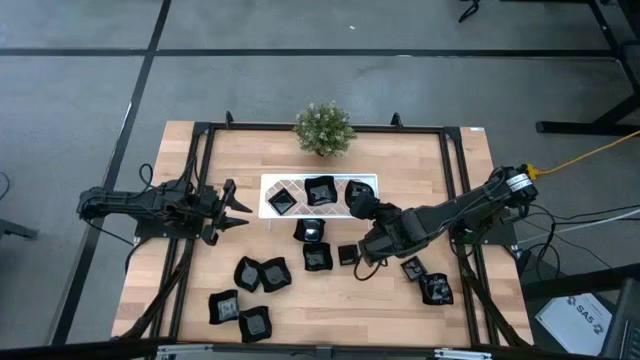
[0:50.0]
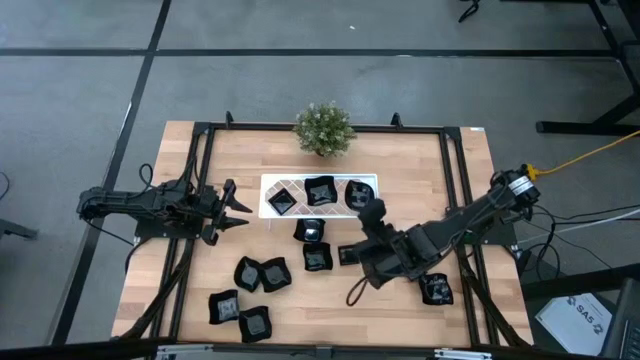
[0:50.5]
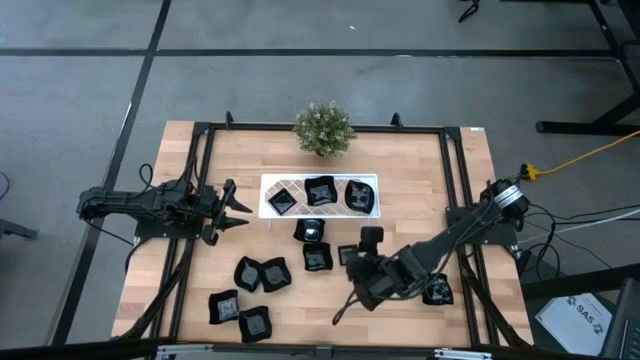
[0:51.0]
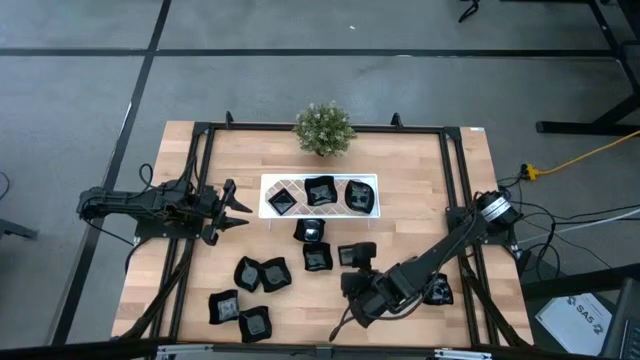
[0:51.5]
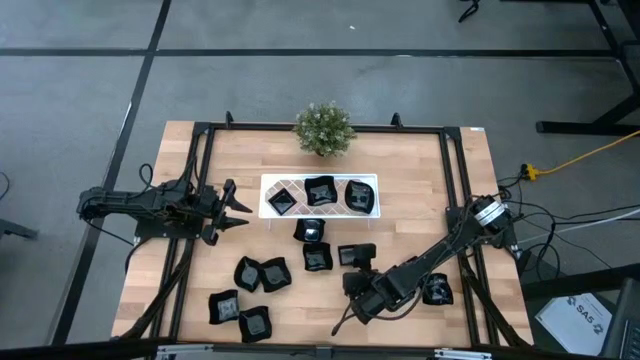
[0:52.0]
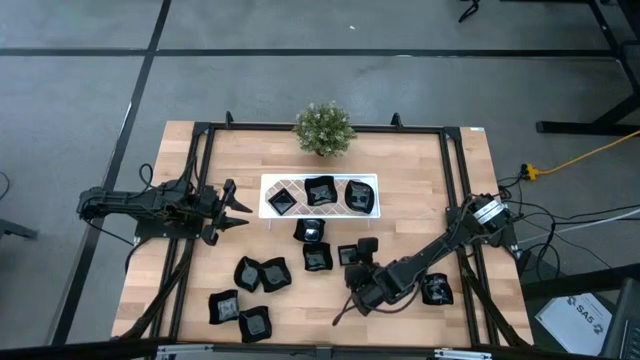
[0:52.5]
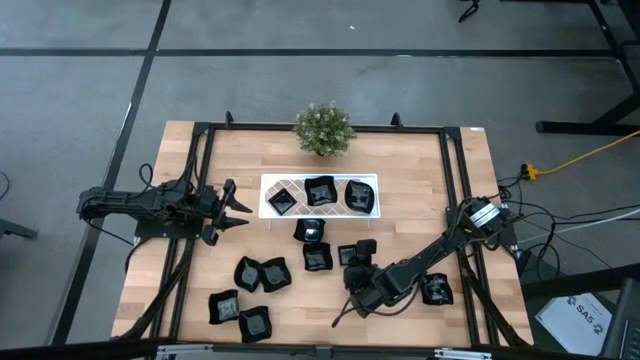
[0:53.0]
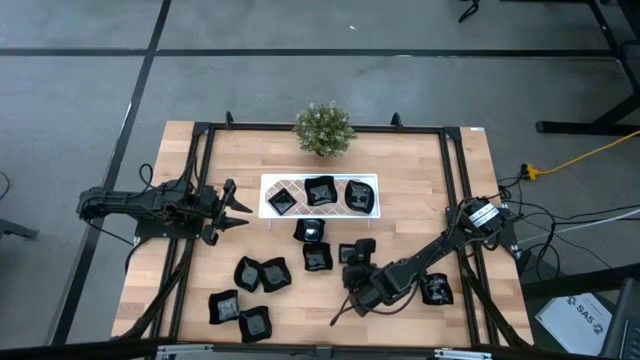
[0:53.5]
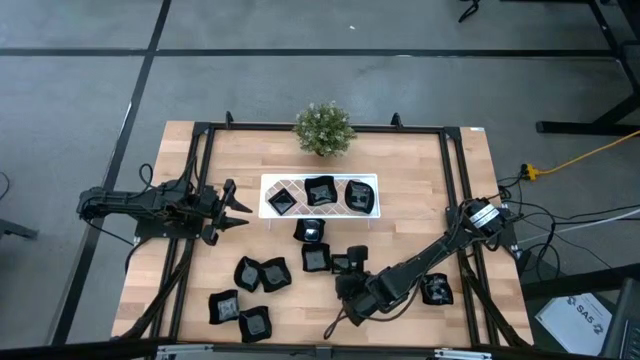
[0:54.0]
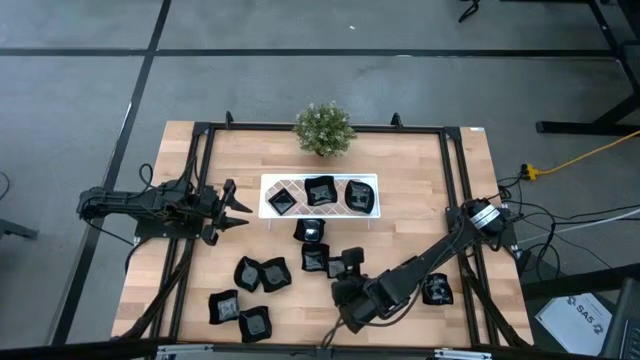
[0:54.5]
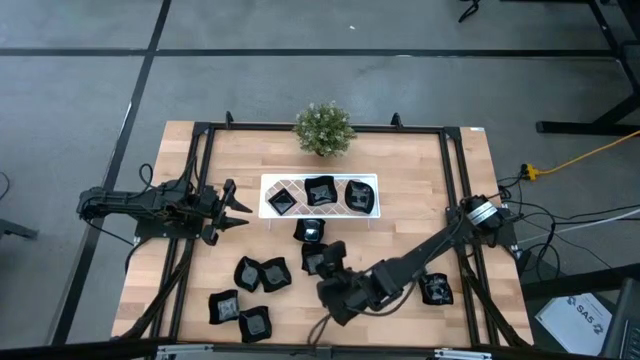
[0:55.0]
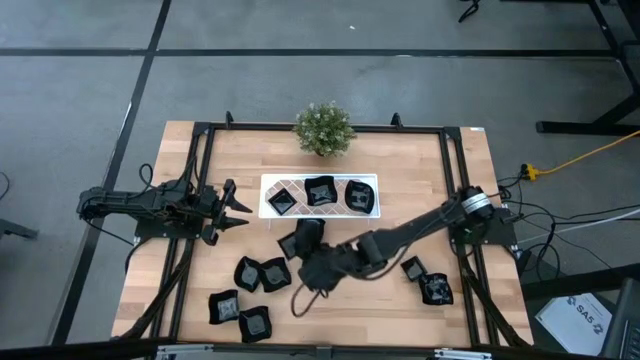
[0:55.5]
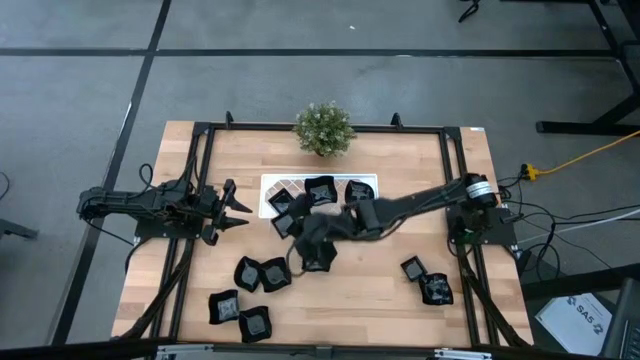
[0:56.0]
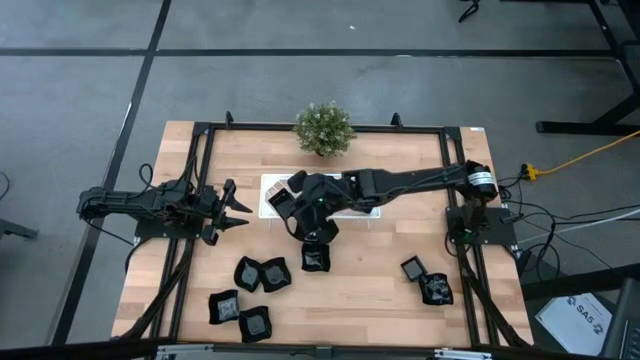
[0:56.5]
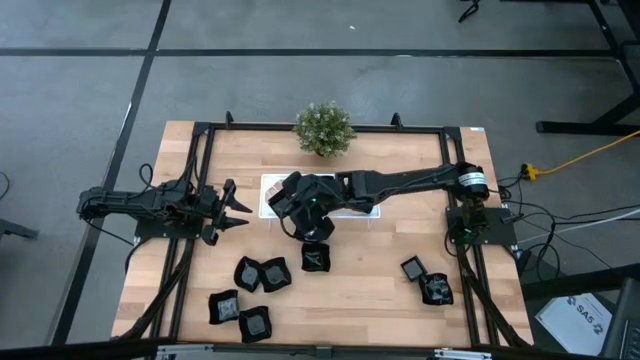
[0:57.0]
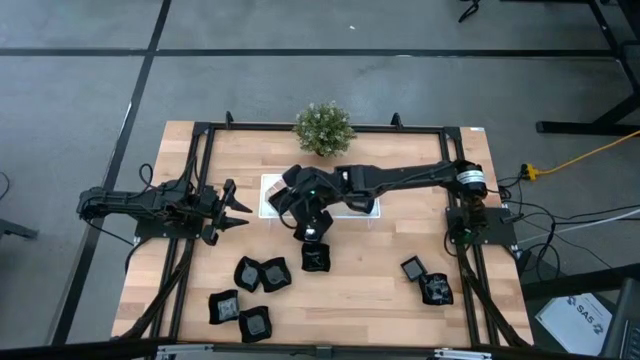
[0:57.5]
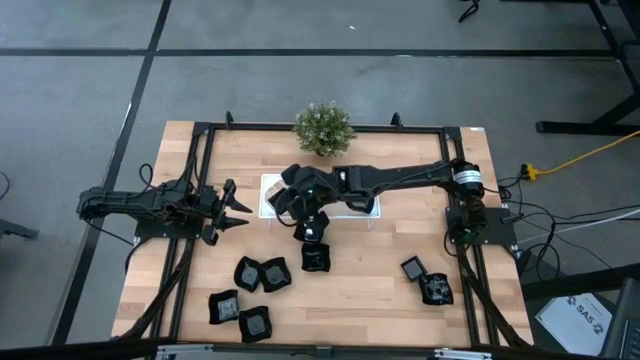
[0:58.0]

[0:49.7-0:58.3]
Task: Pick & Place Mini shaped plates
Stack the black square plate on top of the black square plate on the shelf

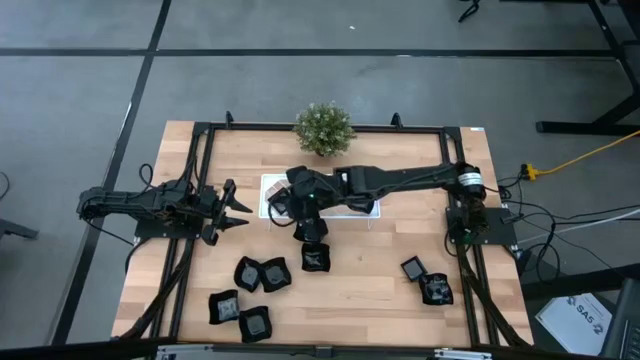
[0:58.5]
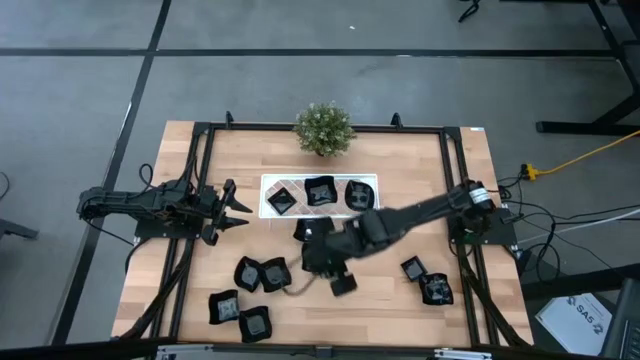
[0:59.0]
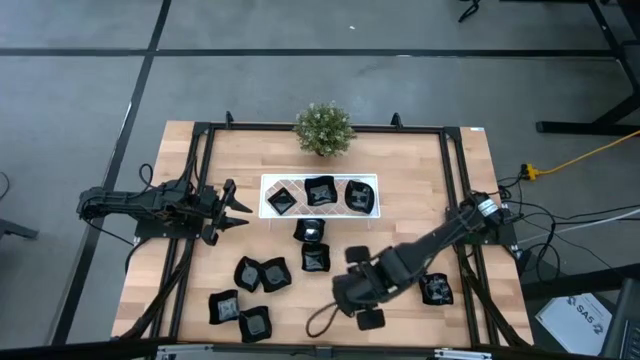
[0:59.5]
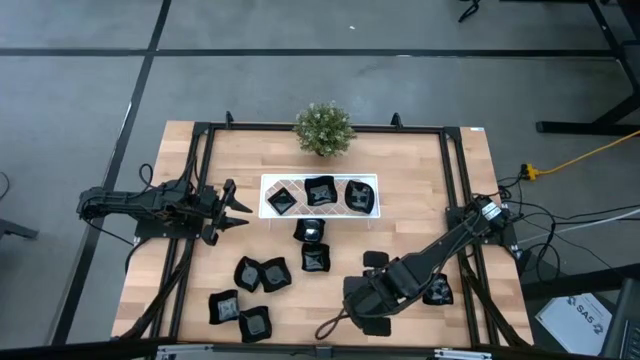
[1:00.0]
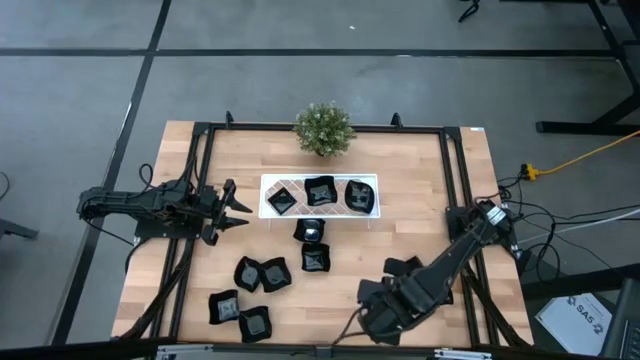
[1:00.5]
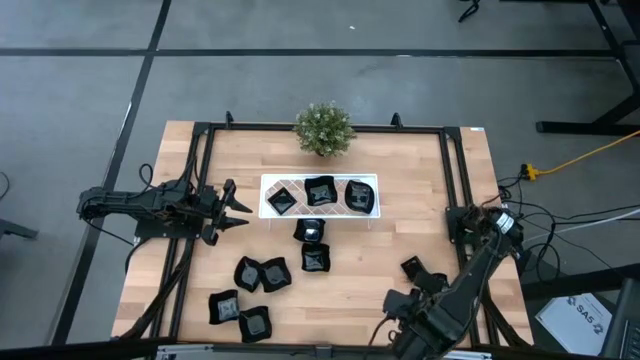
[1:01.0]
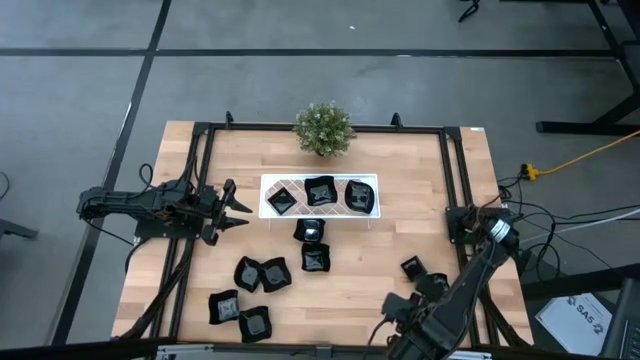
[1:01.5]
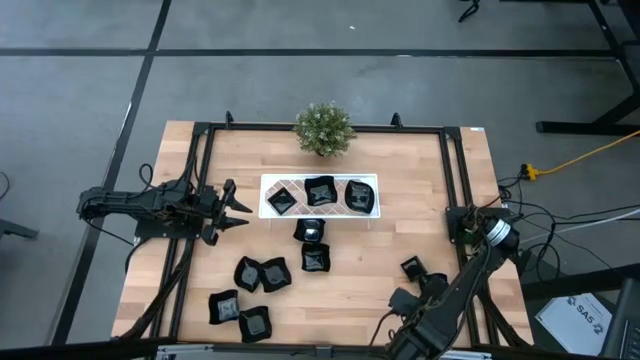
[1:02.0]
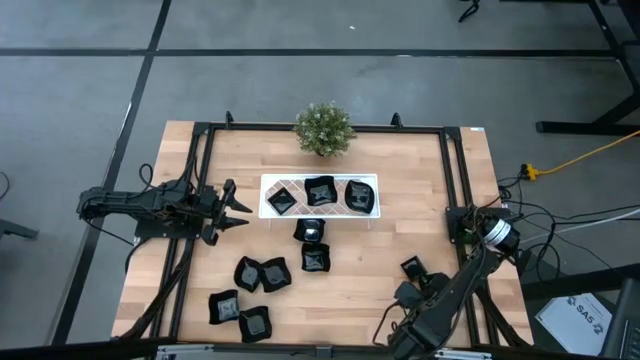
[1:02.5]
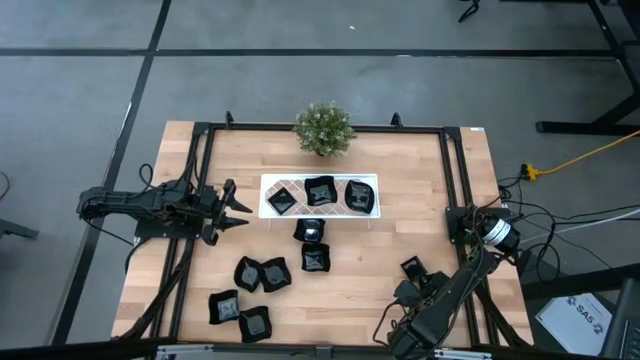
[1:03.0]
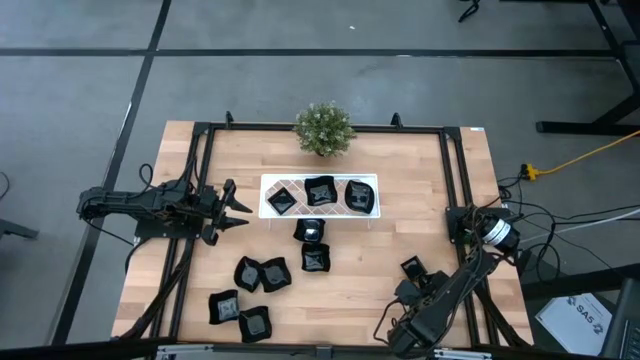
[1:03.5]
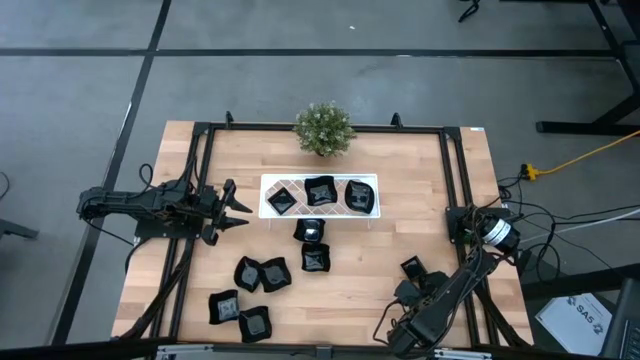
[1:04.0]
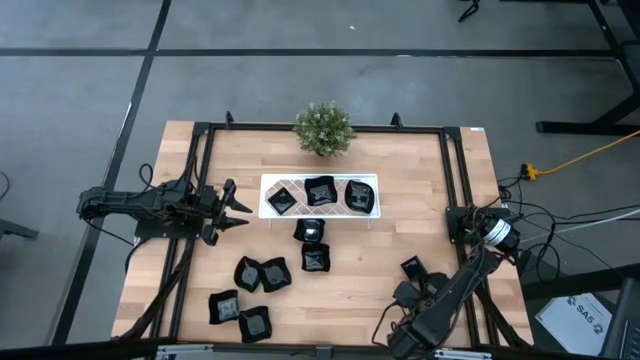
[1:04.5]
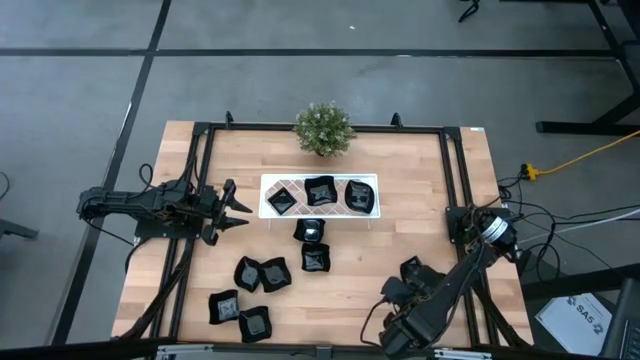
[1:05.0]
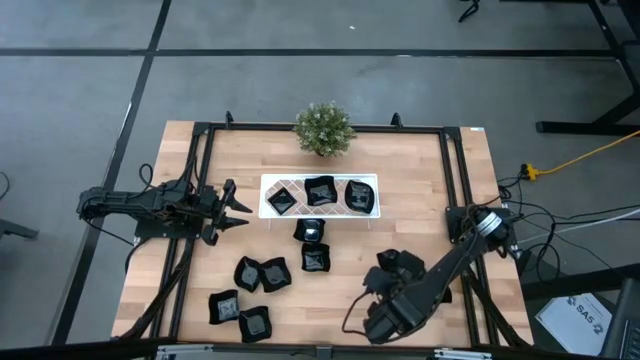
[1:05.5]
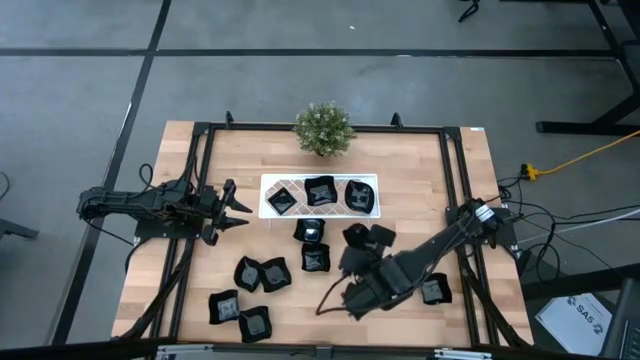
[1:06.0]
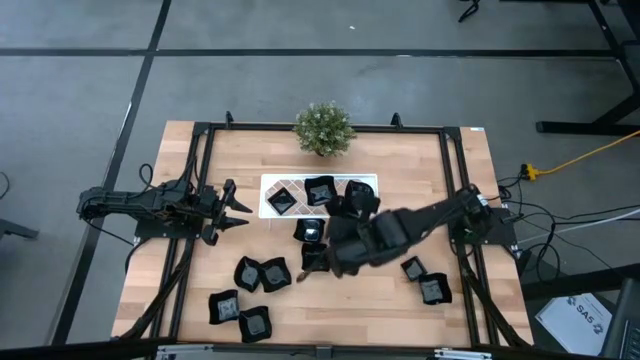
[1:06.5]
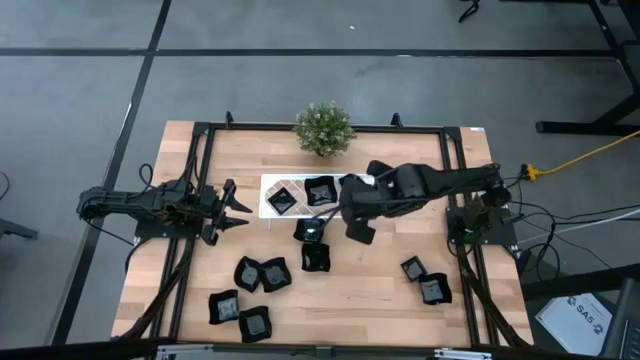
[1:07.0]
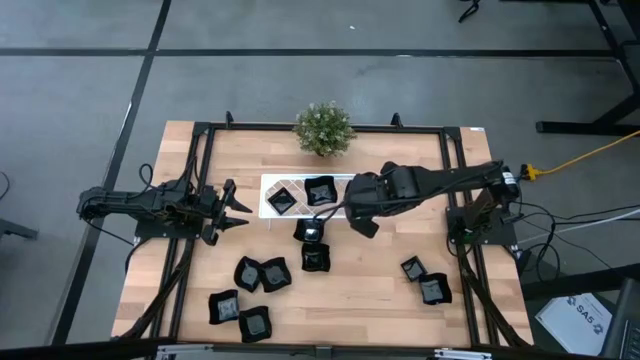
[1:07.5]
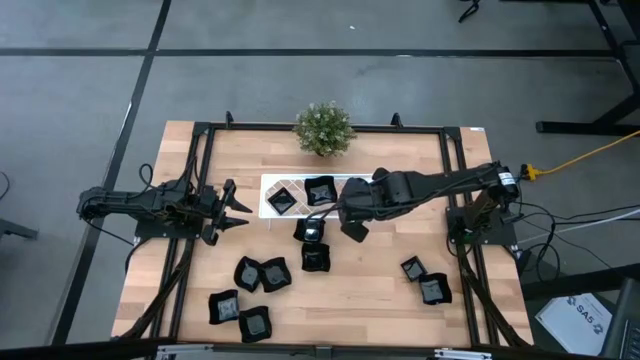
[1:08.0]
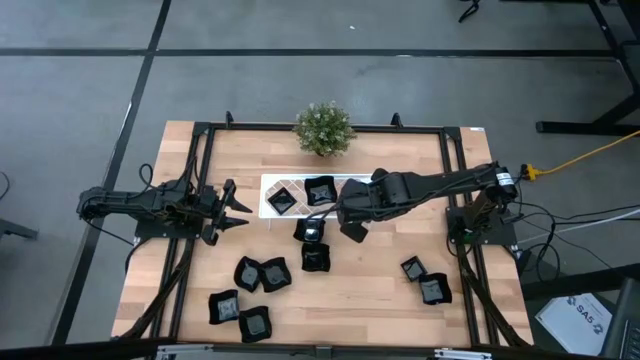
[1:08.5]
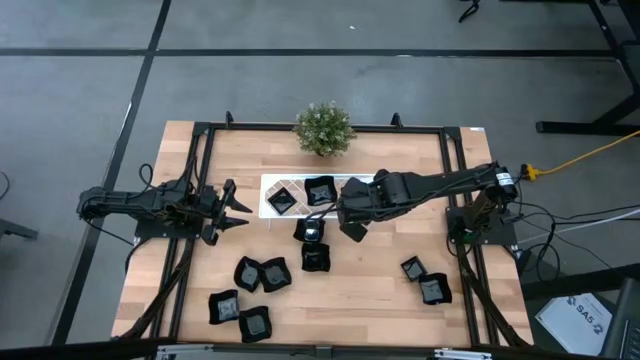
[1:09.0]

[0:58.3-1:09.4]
Stack the black leaf-shaped plate on top of the black leaf-shaped plate on the shelf

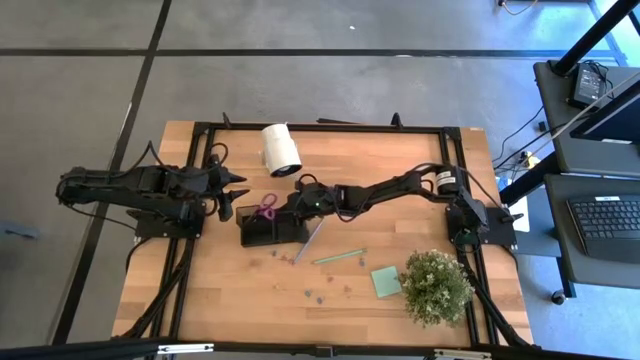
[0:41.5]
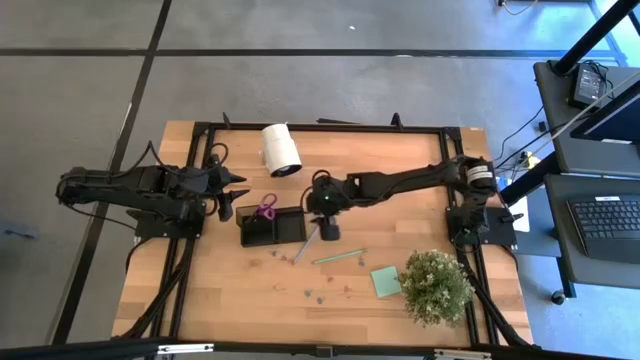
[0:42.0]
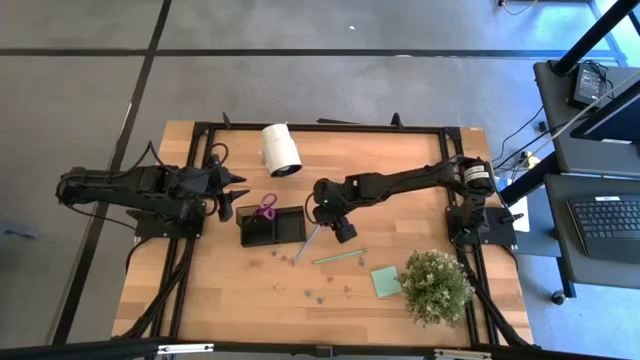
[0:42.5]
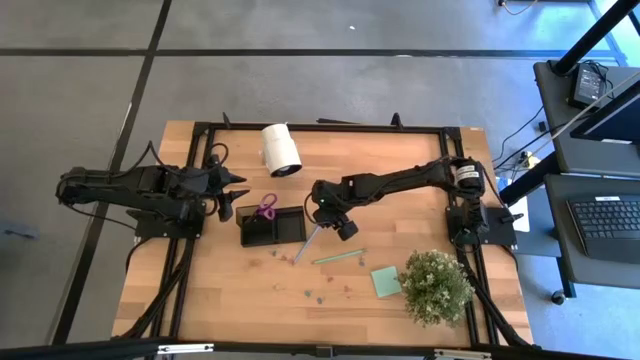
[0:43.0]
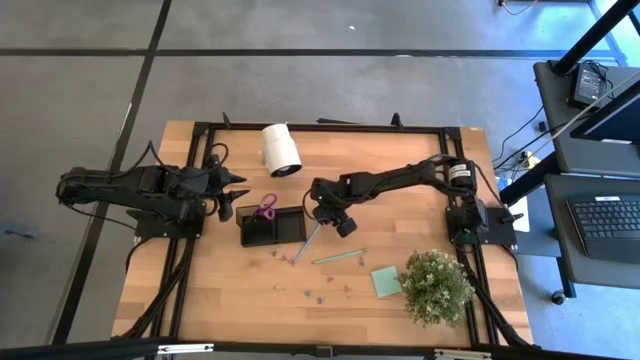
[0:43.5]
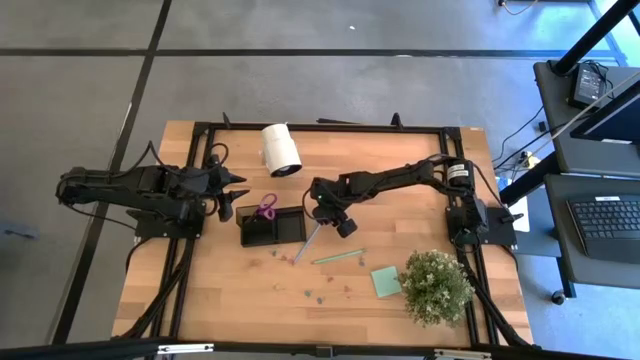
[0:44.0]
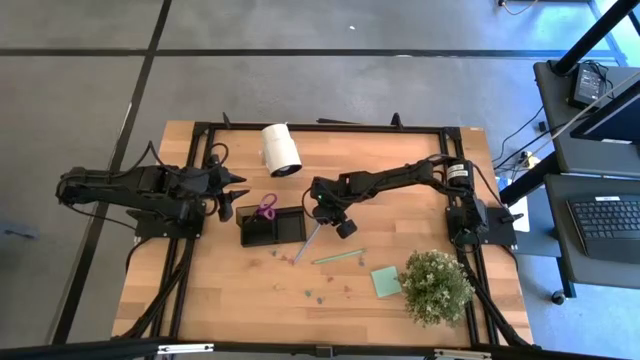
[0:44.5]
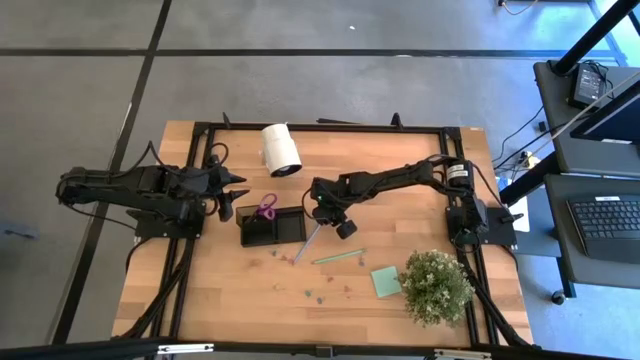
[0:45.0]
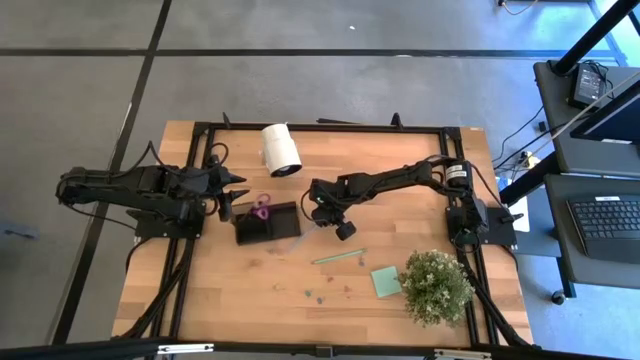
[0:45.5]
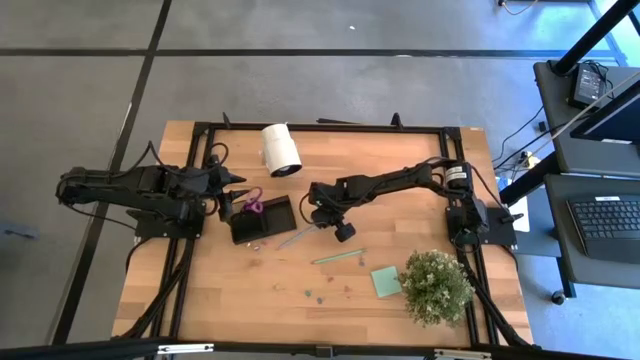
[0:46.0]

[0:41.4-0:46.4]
Task: Pick and place office supplies into organizer
Put the blue pencil into the black desk organizer
